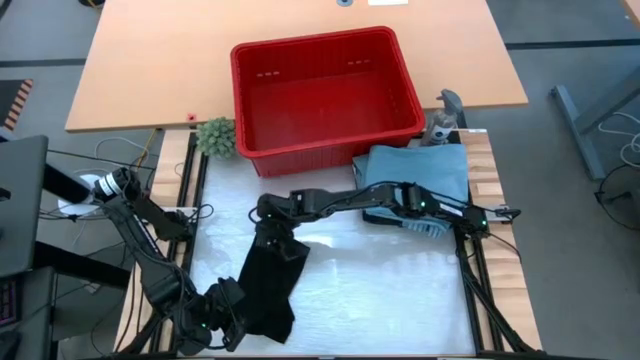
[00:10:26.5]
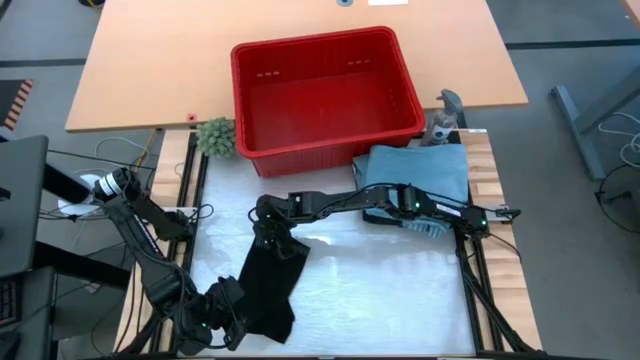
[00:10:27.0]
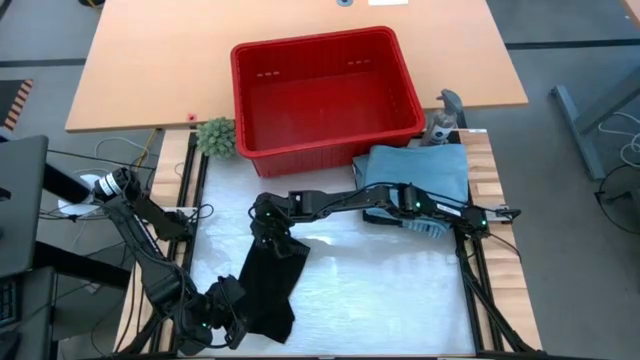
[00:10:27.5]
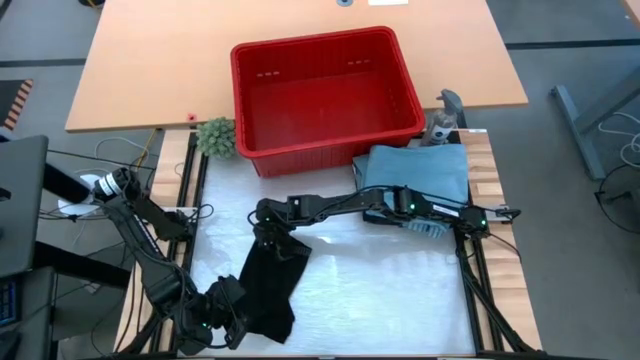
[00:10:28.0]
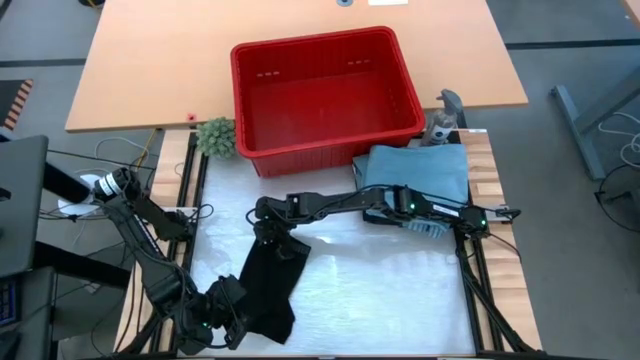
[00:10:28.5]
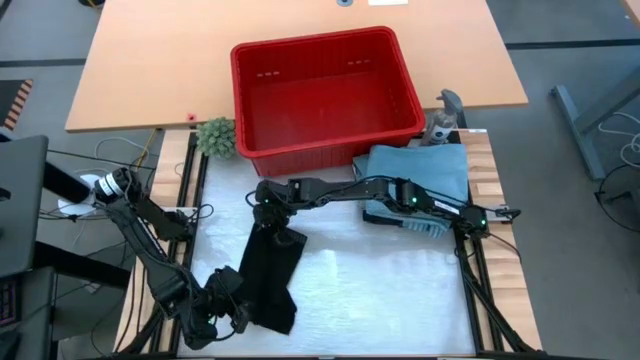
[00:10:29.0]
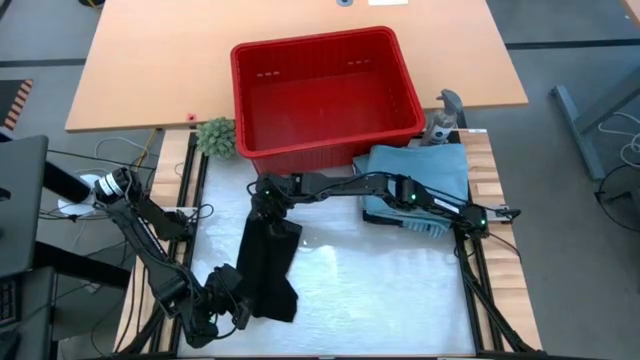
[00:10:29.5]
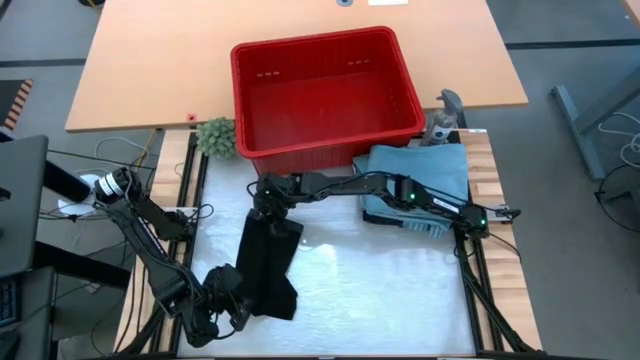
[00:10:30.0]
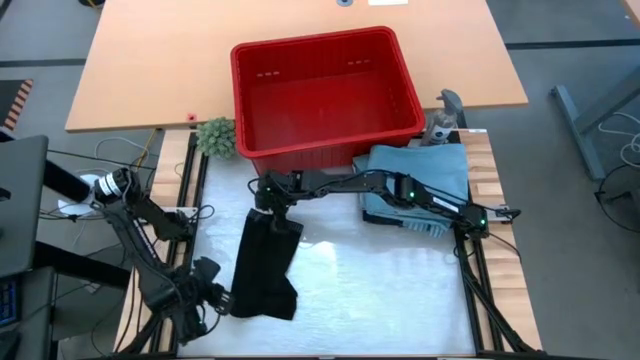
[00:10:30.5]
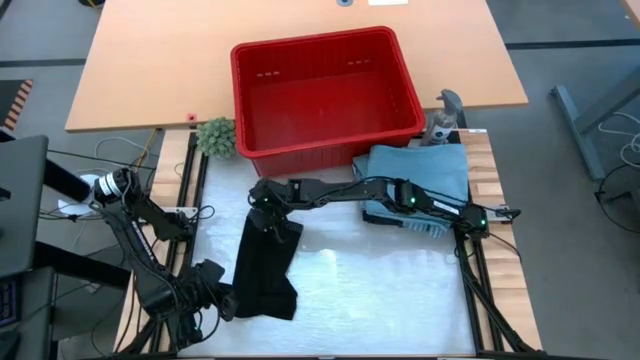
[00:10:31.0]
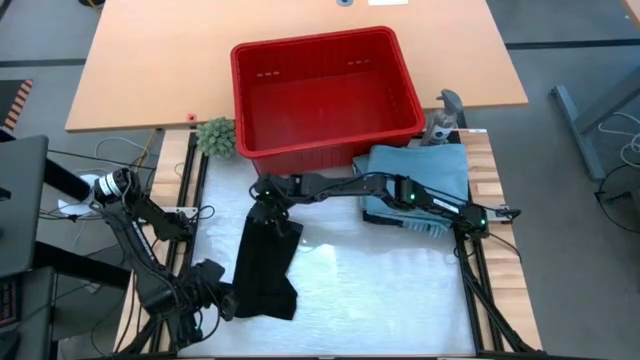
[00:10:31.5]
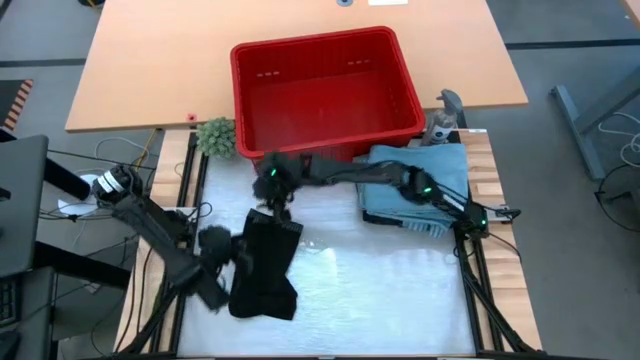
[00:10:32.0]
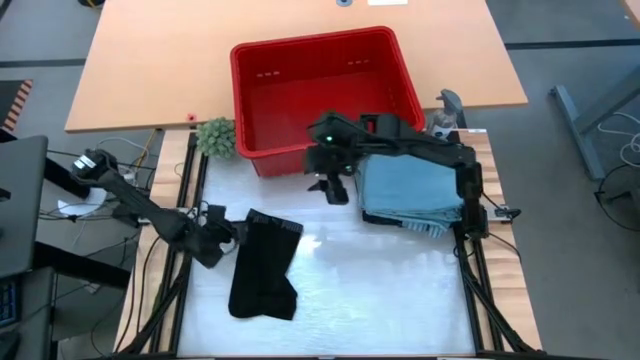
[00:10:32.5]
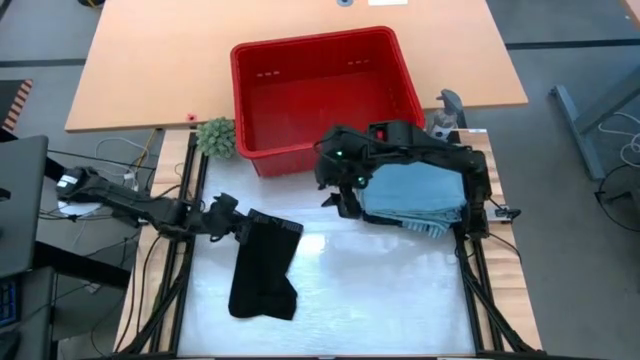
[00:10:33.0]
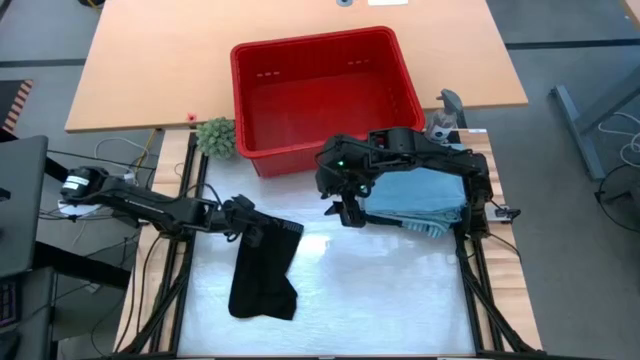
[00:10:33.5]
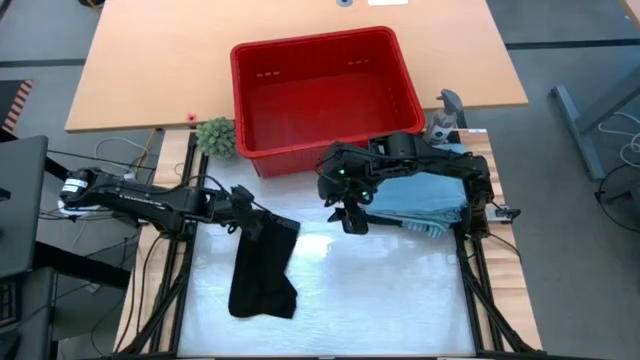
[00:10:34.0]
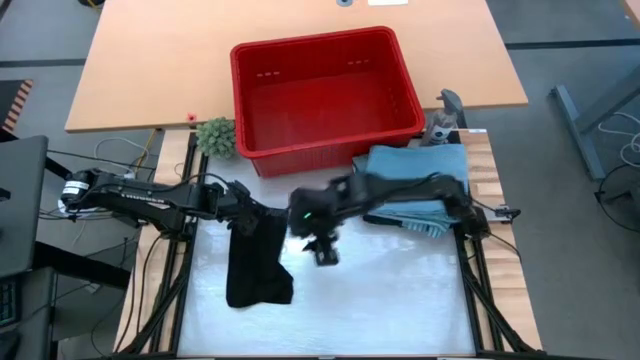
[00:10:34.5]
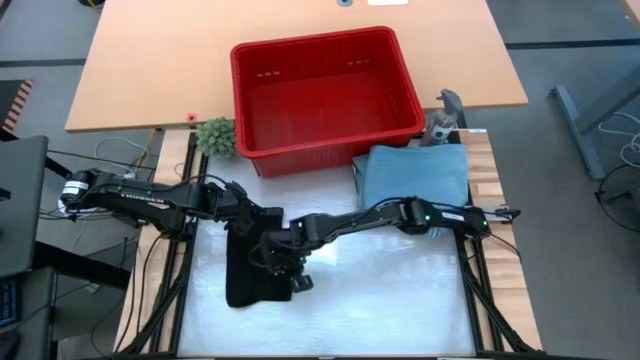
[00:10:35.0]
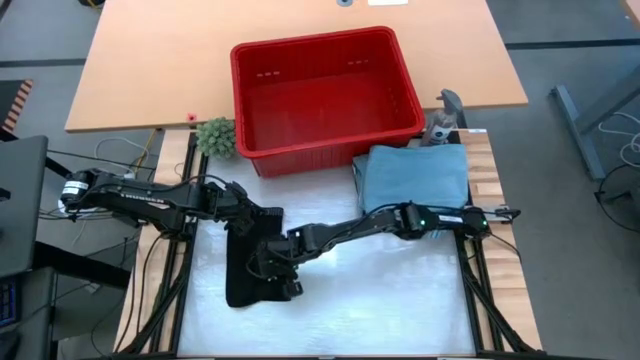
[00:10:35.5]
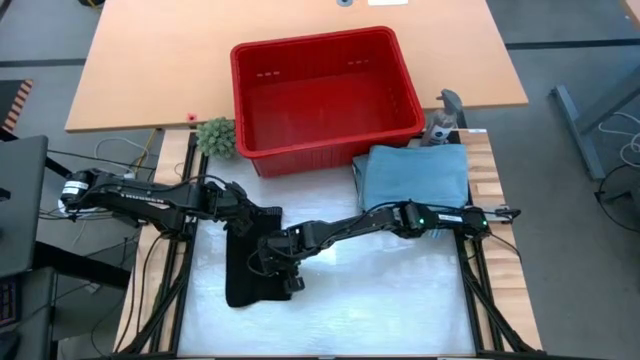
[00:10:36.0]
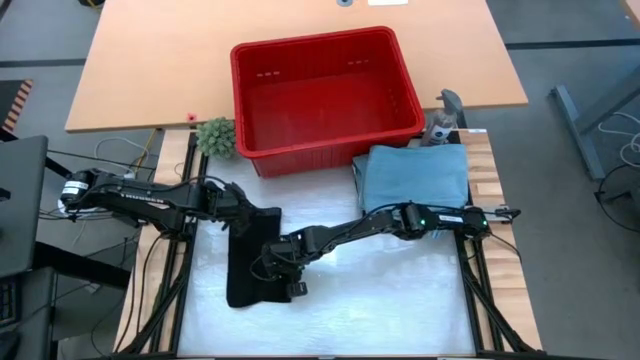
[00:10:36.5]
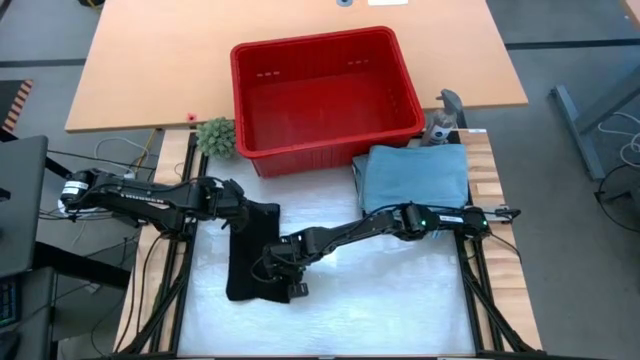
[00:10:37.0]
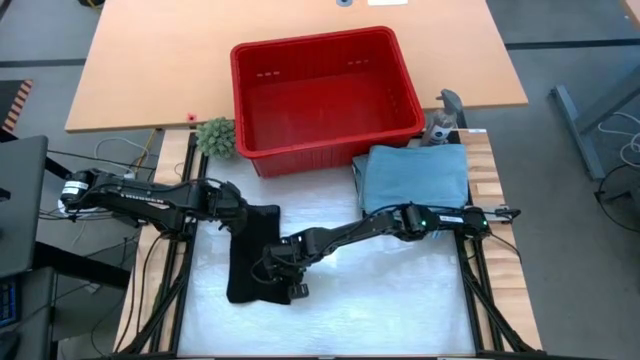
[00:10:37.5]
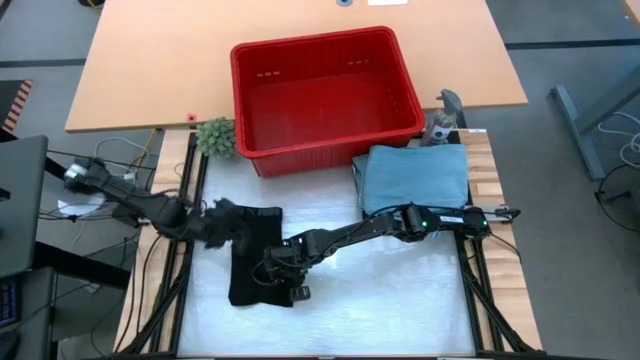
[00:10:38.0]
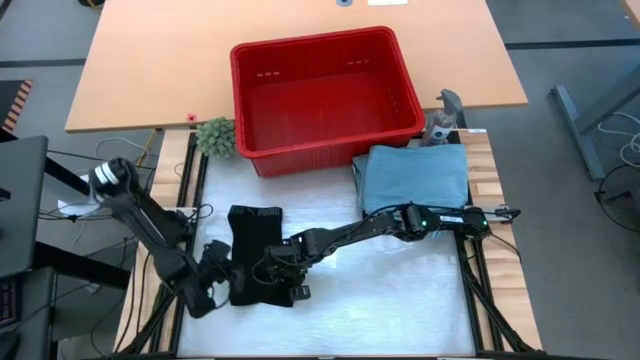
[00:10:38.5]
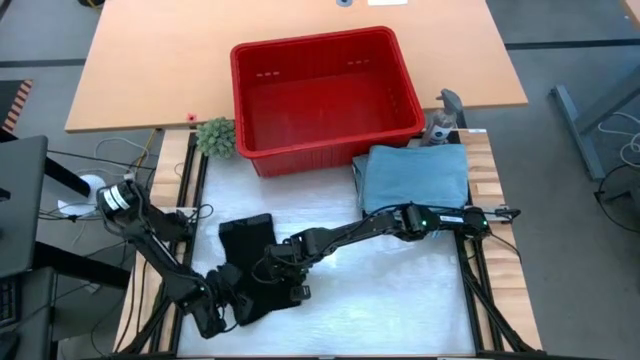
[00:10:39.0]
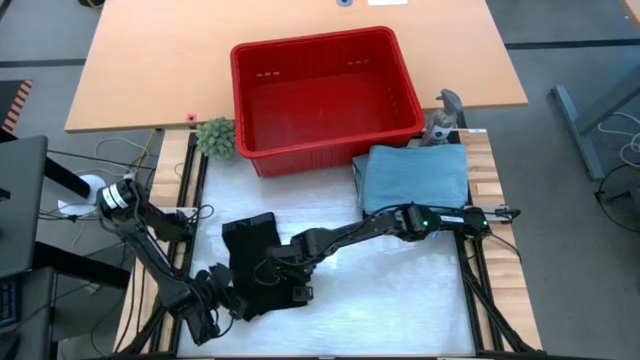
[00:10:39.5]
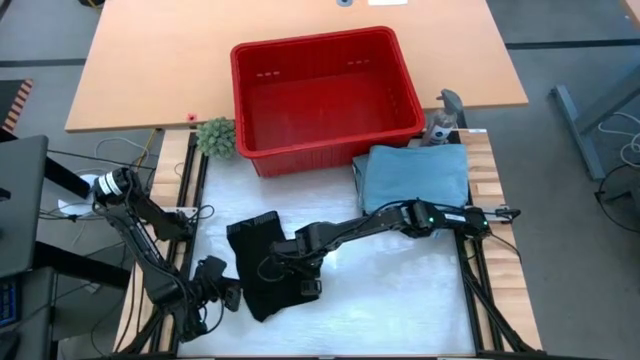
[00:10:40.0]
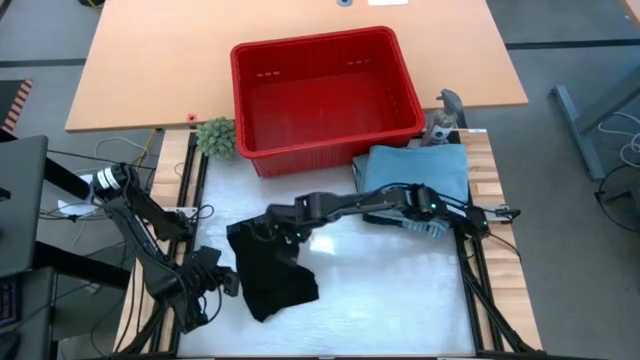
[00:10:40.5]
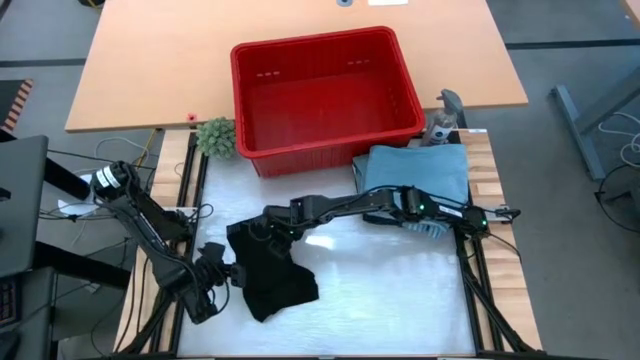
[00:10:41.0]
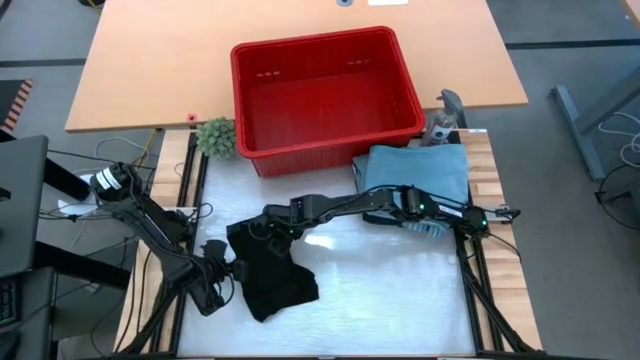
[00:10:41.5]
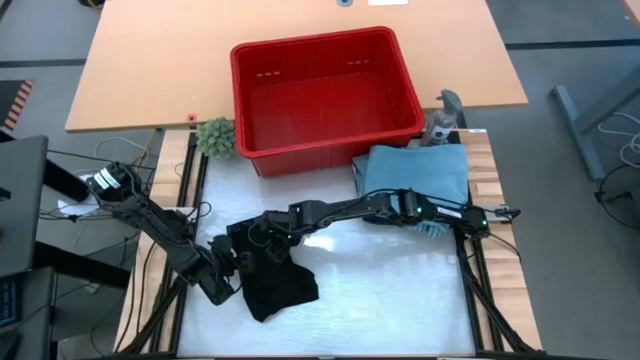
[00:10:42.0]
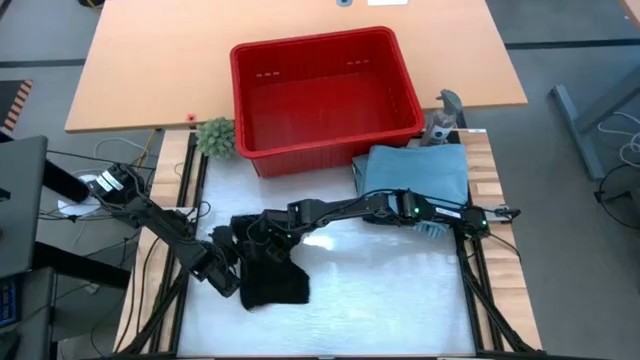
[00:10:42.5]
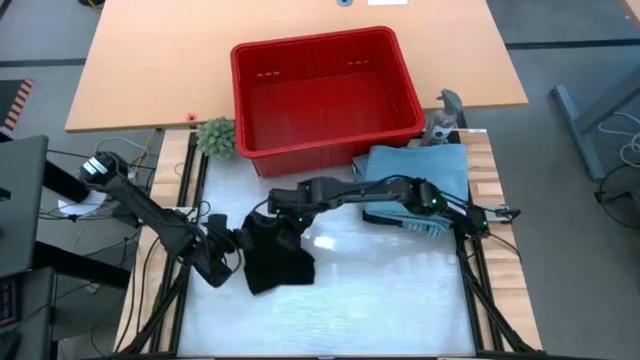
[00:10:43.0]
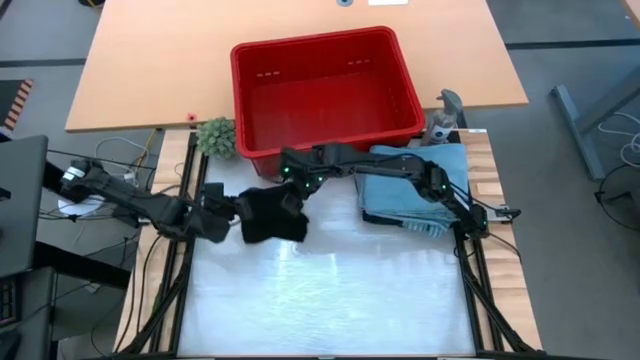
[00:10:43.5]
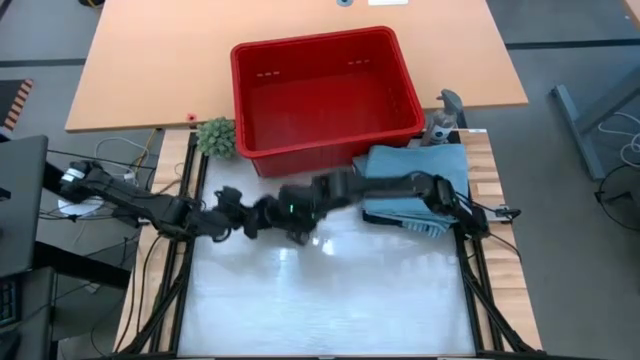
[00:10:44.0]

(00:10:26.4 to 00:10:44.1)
Task: Fold Laundry from Bin
Fold the black boxer short
